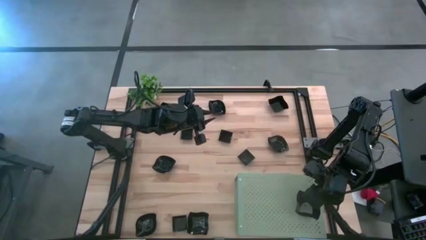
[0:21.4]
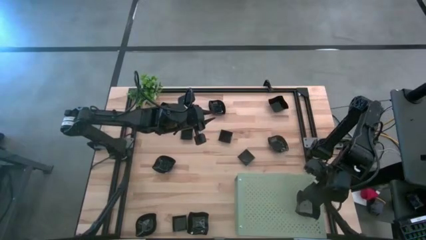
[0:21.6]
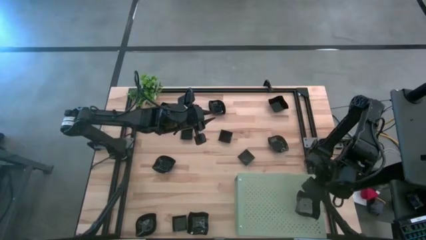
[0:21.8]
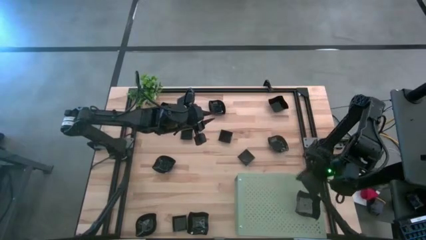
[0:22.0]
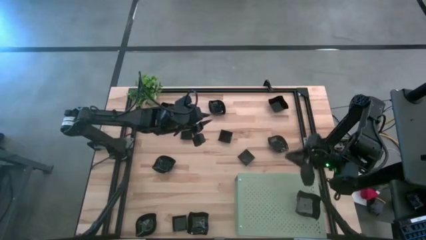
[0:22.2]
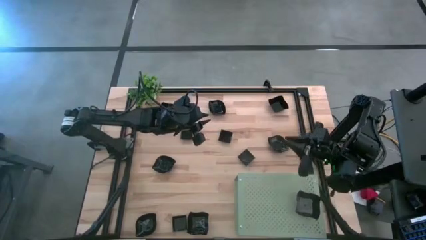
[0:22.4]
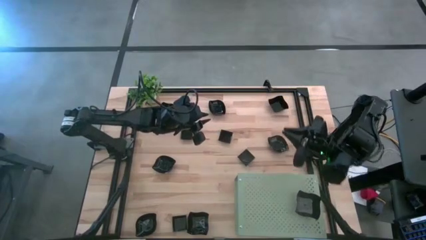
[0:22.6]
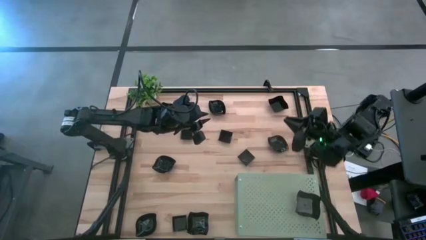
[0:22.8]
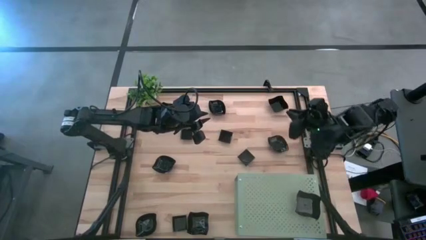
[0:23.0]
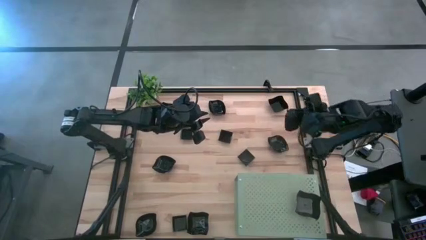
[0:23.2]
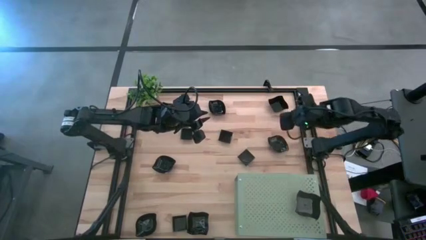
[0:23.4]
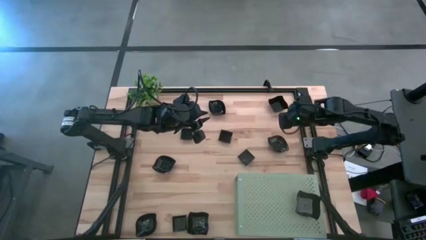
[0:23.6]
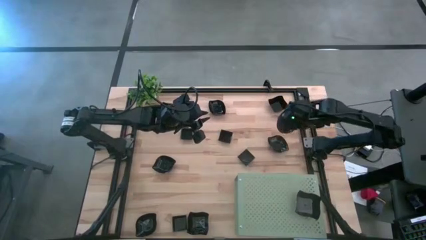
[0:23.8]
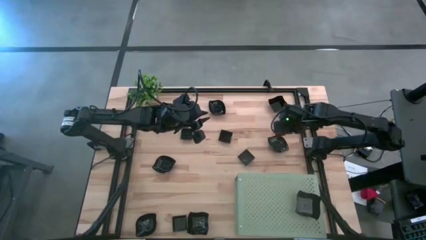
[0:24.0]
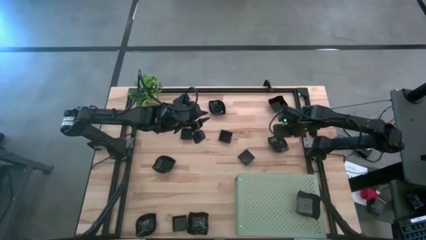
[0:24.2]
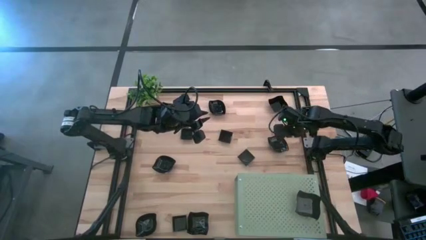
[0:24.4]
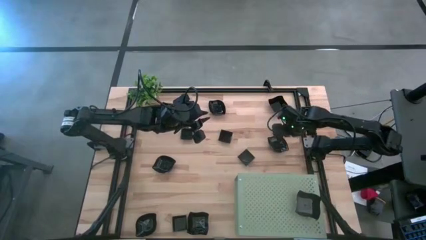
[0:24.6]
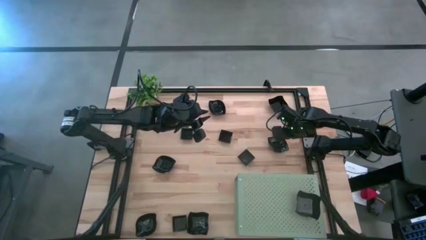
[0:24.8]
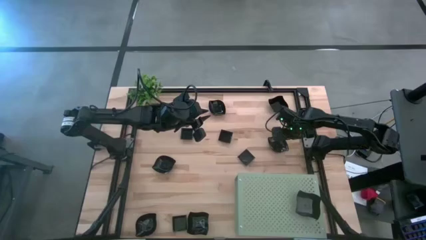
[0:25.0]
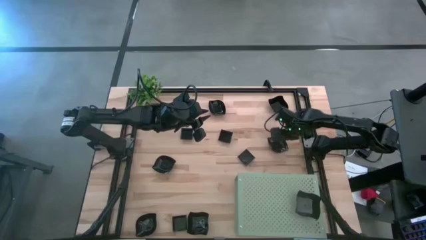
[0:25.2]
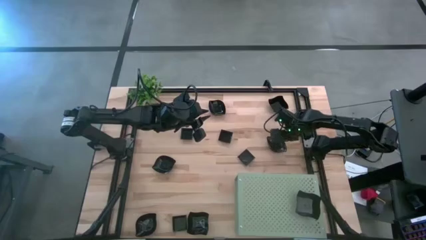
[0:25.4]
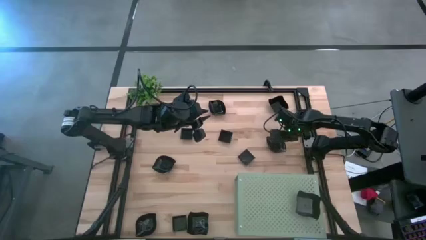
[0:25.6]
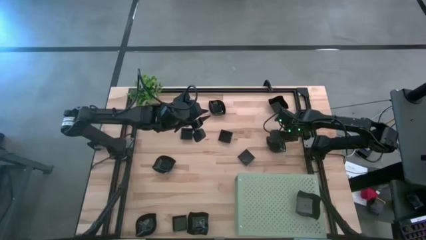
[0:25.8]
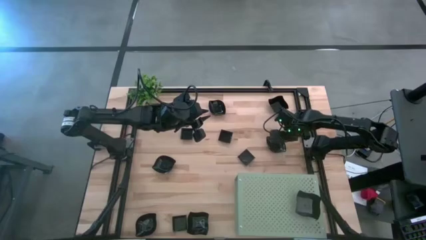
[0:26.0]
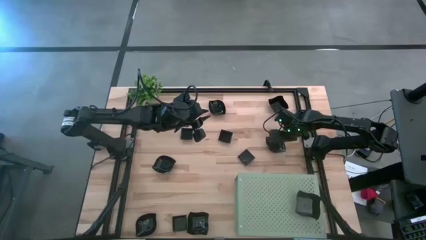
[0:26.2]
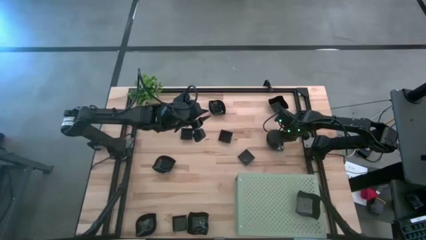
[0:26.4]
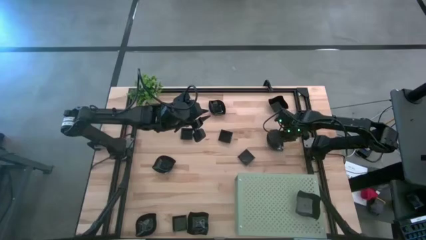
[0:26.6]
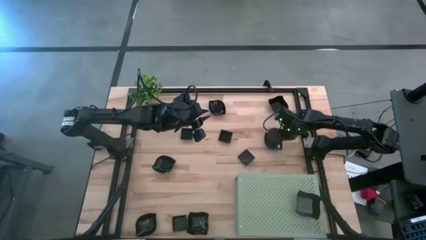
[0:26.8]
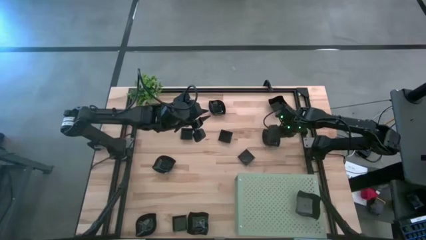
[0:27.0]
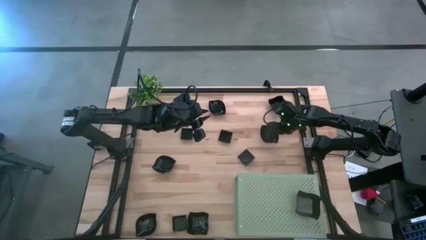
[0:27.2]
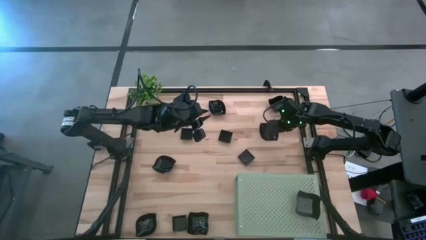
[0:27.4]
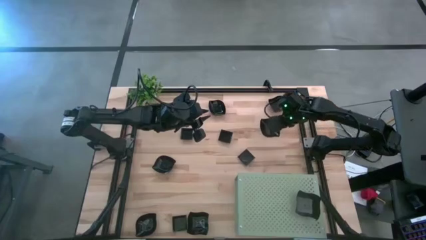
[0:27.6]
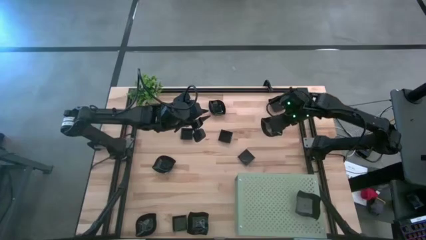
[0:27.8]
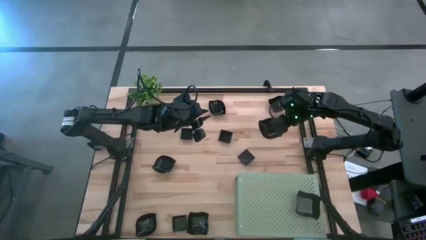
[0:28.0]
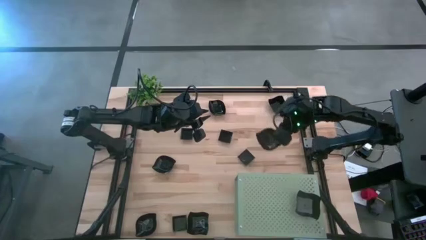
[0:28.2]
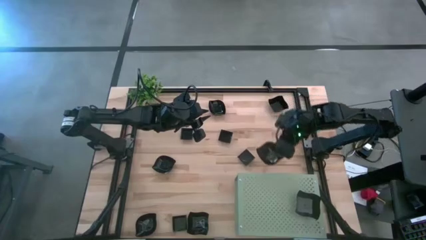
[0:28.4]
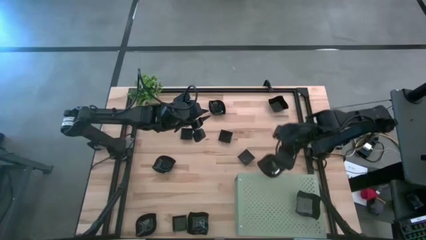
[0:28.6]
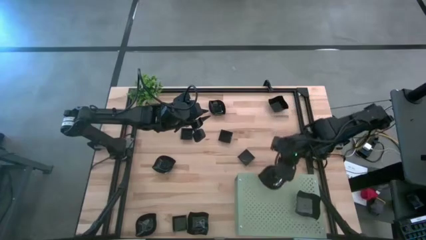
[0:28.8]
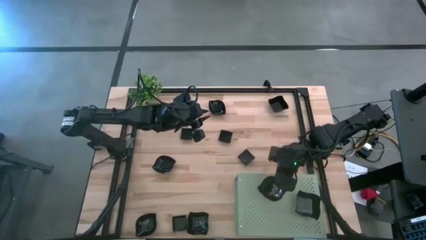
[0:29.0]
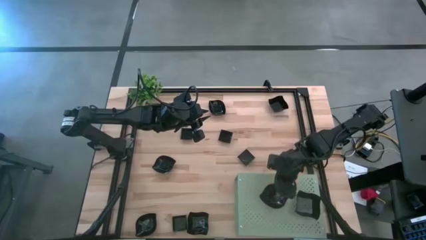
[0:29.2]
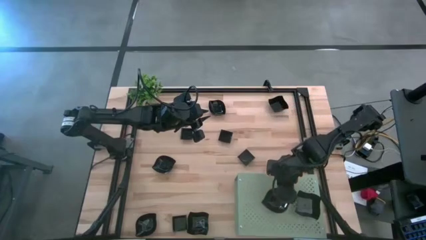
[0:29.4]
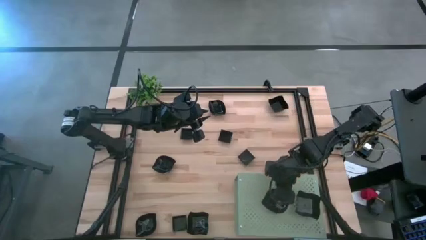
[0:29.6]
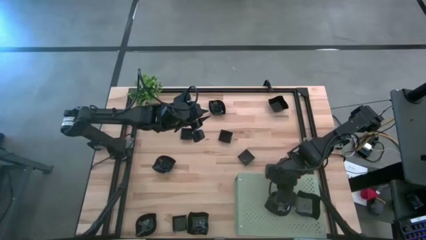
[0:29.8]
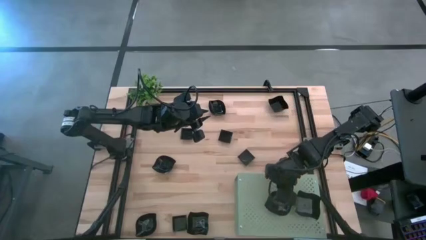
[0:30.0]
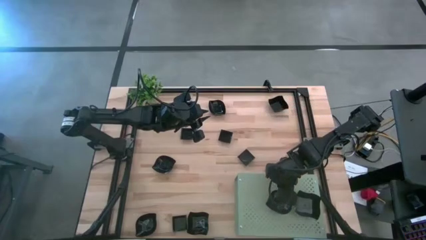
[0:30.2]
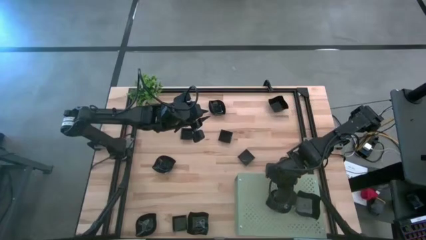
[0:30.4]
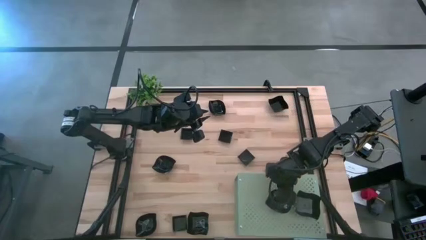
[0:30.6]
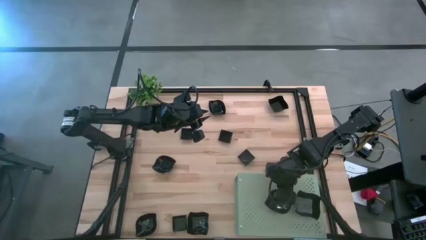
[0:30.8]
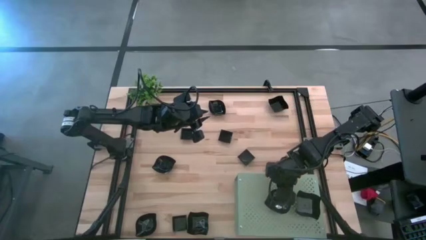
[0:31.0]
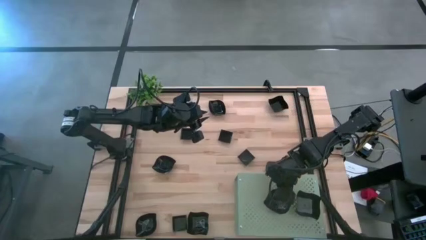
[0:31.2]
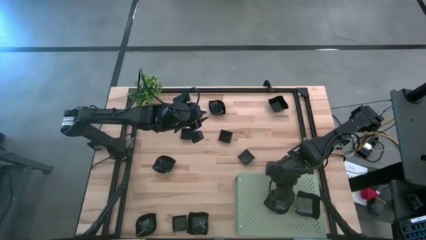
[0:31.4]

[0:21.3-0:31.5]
Task: Pick & Place Mini shaped plates
Put the leaf-shaped plate on the shelf
